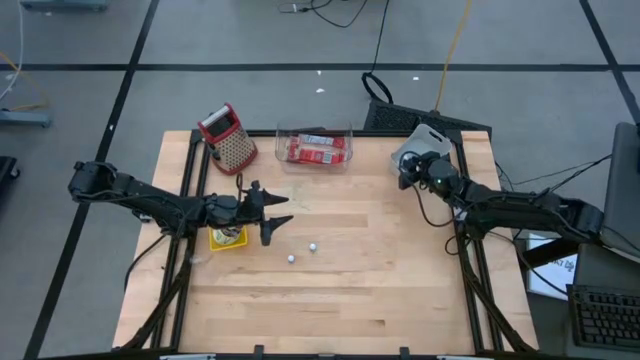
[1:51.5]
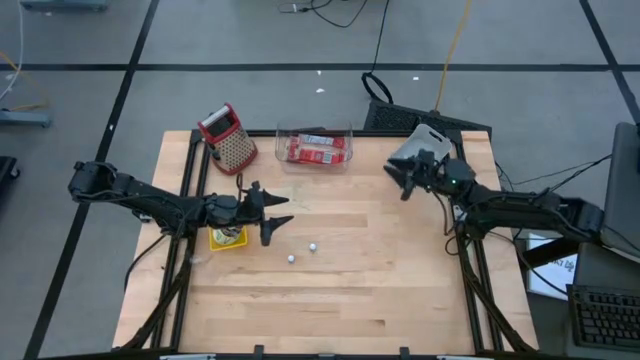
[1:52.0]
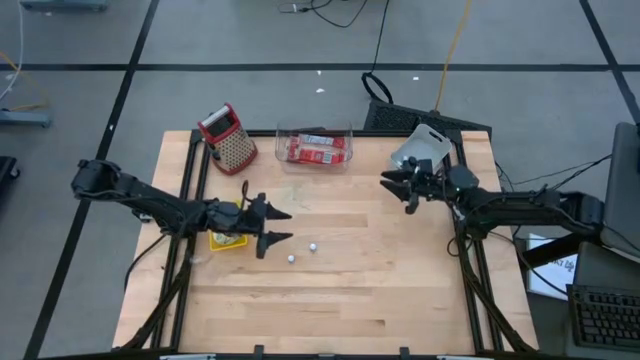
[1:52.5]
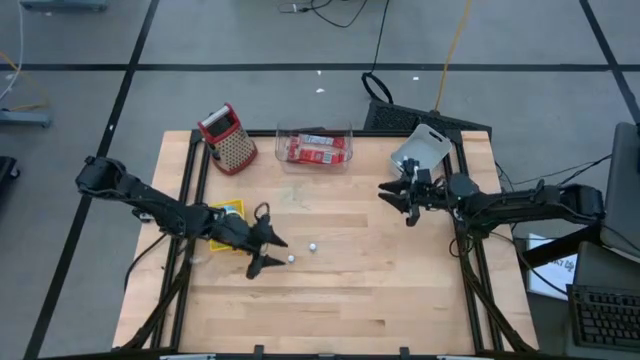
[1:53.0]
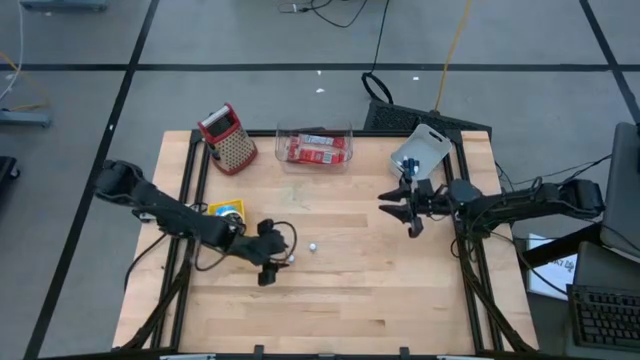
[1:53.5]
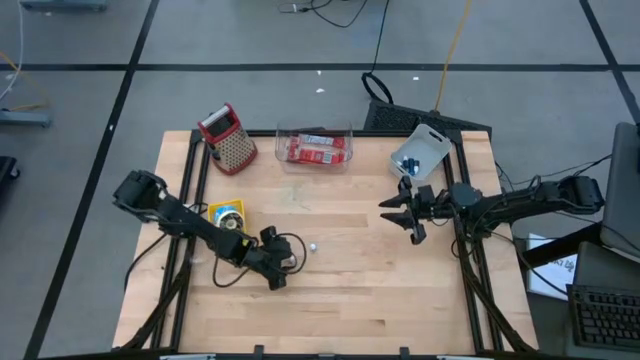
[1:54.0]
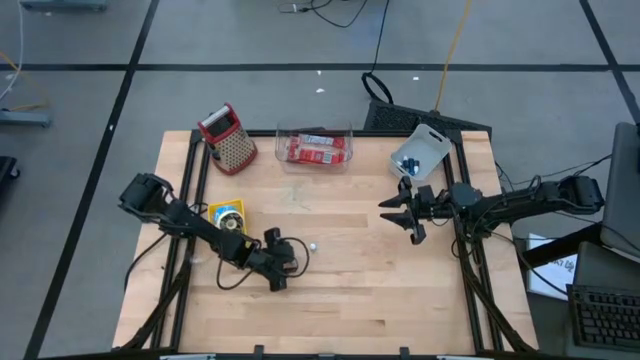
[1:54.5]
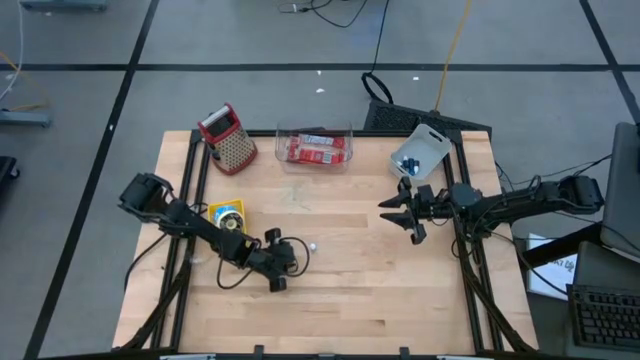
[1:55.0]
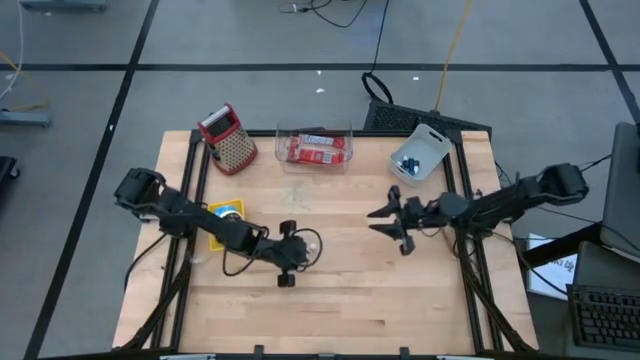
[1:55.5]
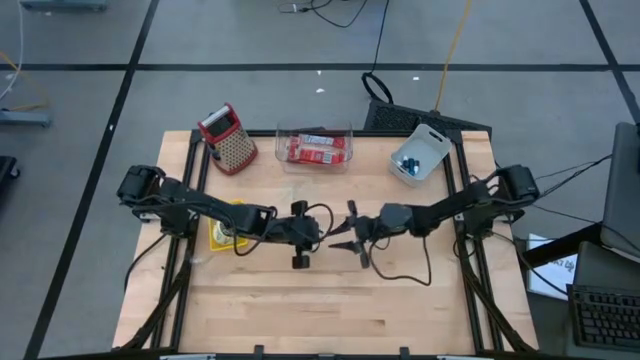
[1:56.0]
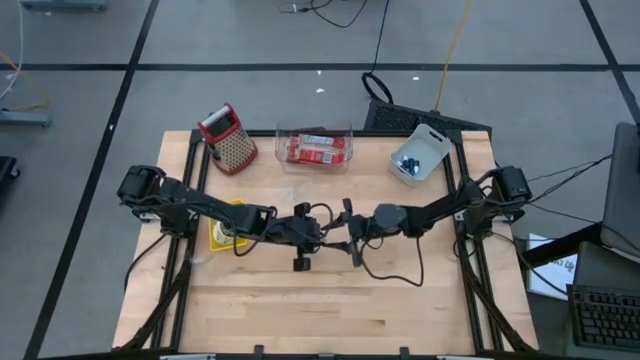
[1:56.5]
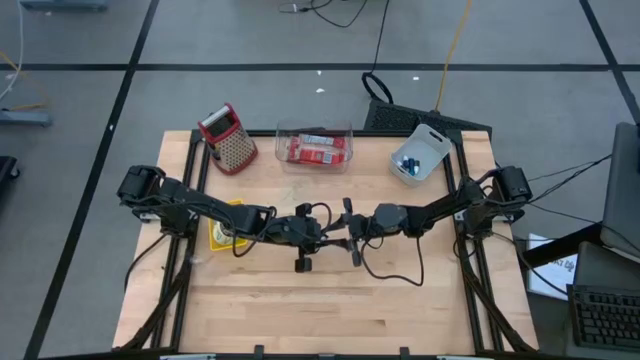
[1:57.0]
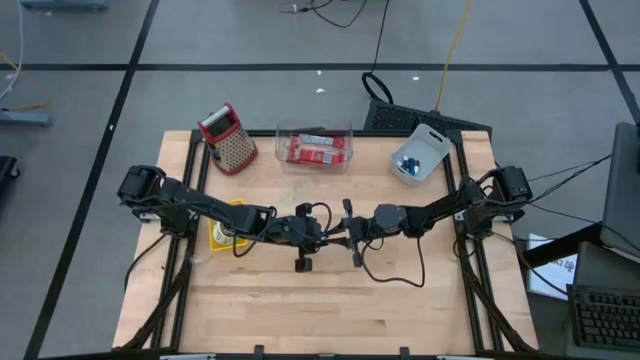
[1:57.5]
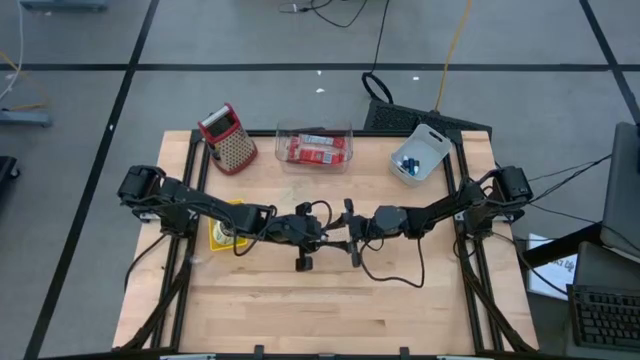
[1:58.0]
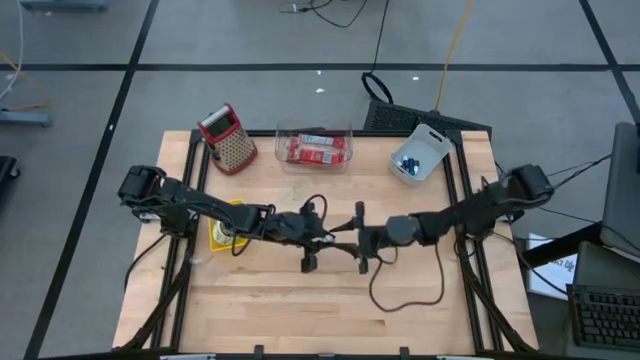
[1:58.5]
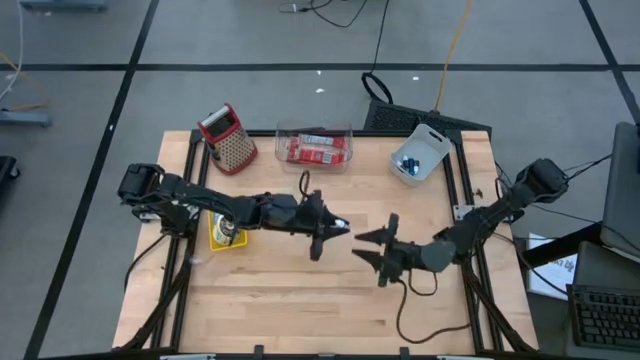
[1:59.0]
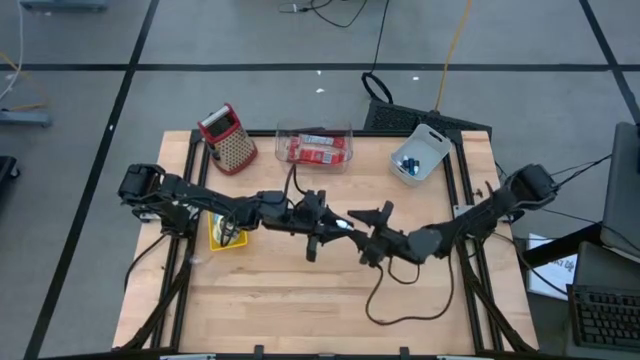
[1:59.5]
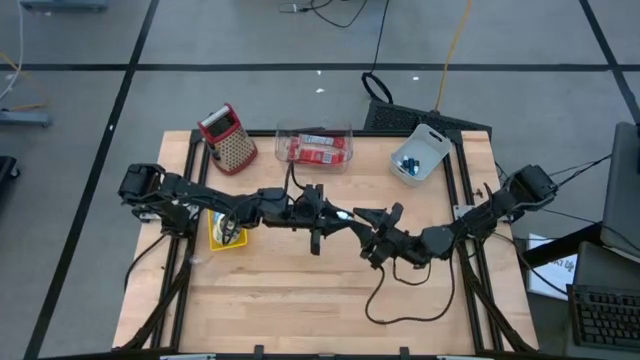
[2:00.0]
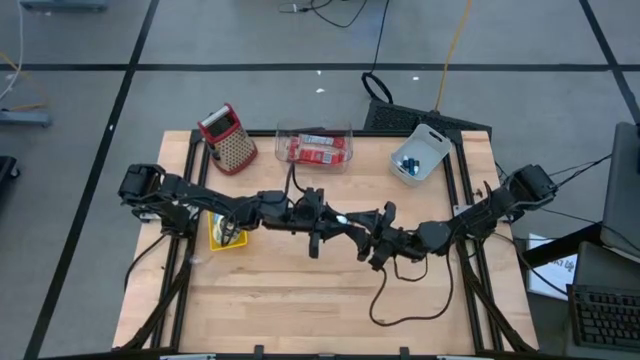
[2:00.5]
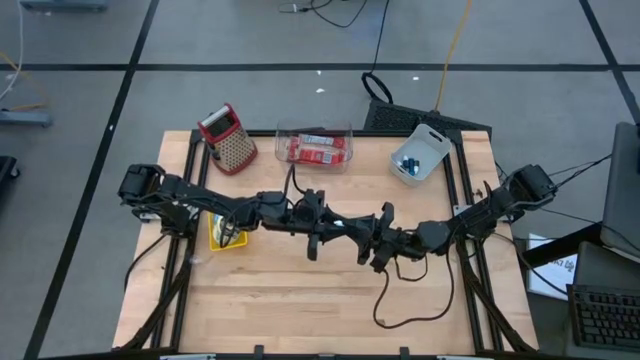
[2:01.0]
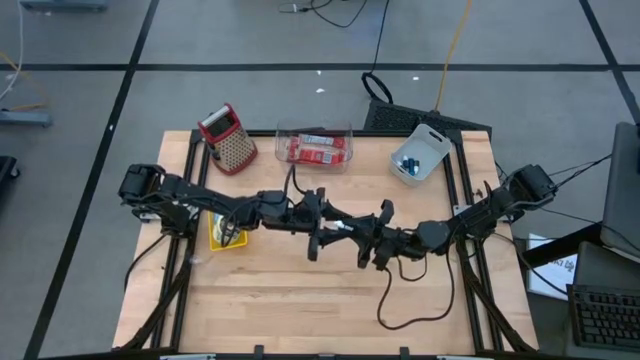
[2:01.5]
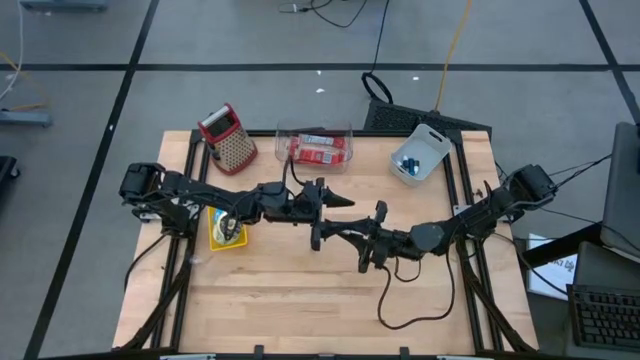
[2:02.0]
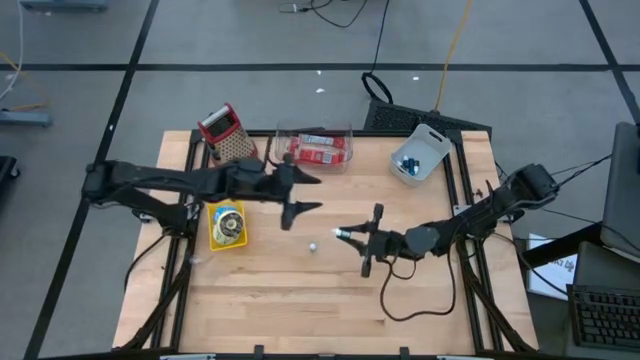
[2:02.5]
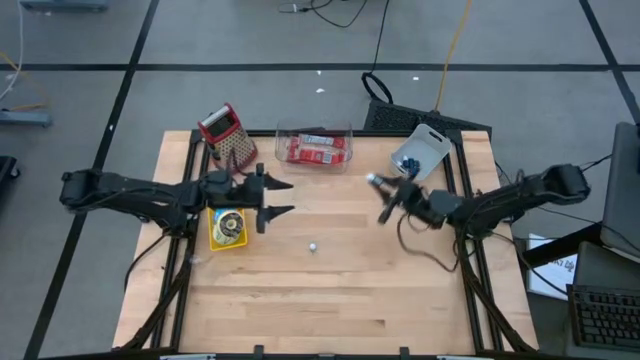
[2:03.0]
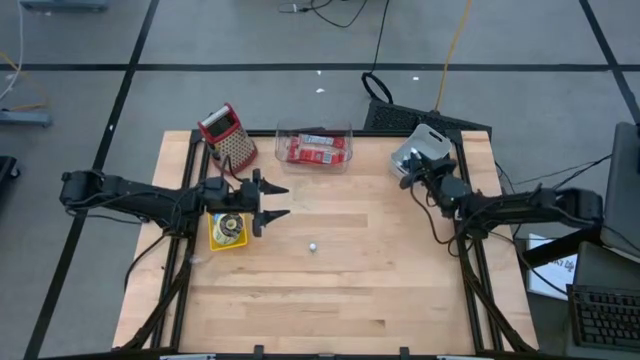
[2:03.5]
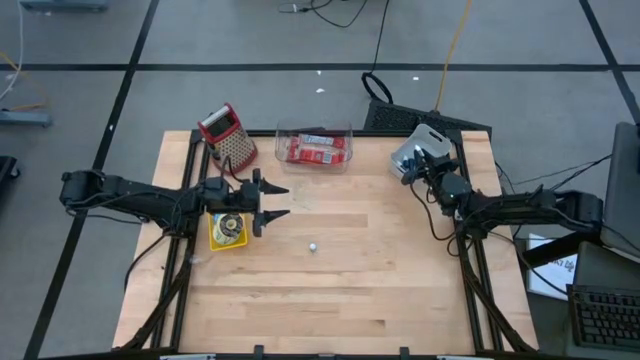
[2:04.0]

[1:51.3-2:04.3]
Put the green food coloring bottle into the white bin

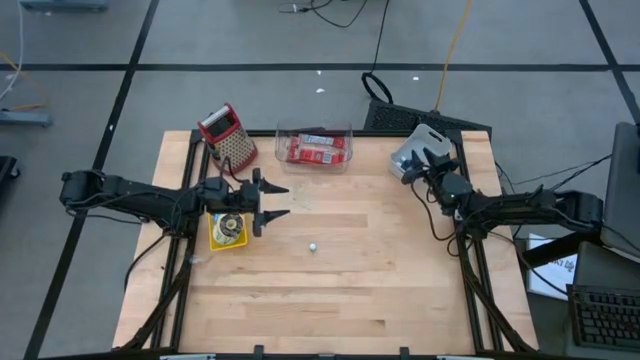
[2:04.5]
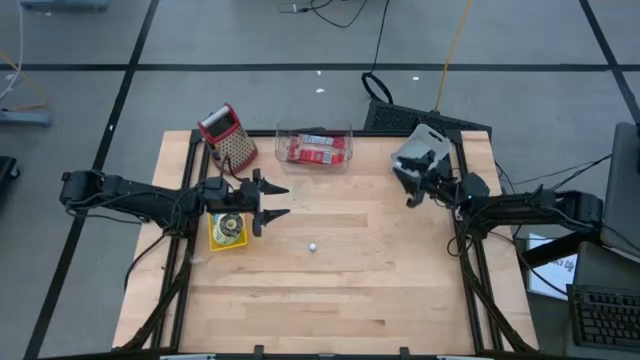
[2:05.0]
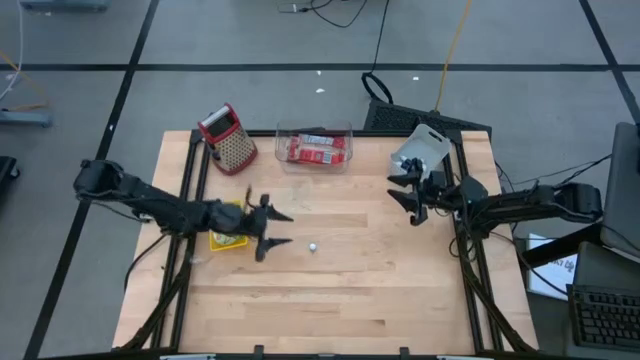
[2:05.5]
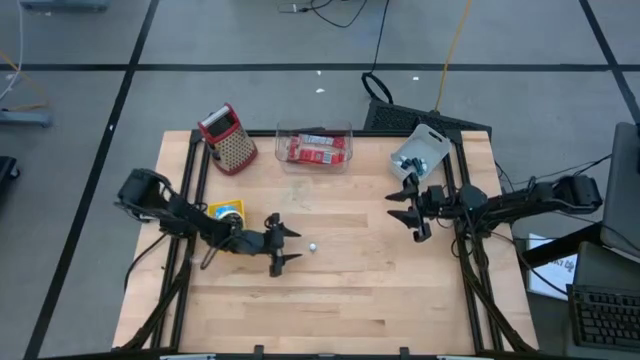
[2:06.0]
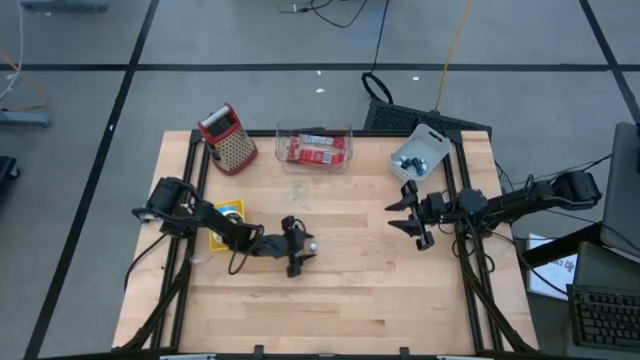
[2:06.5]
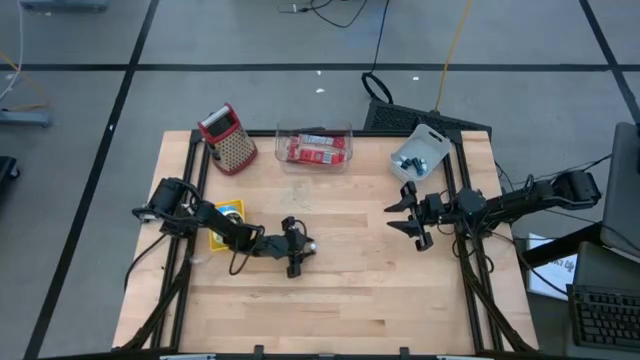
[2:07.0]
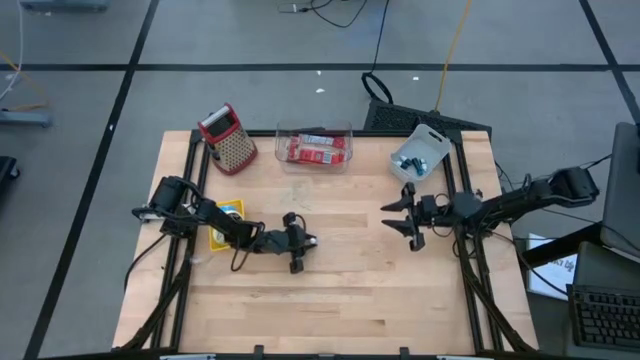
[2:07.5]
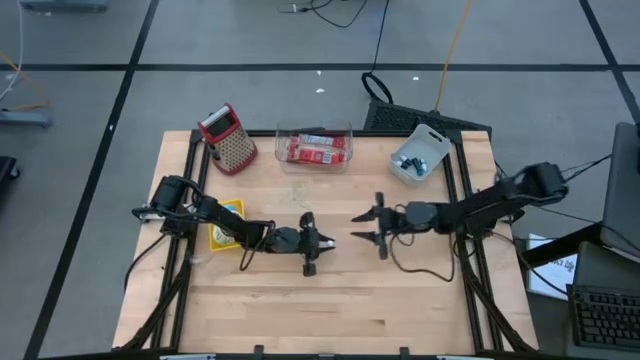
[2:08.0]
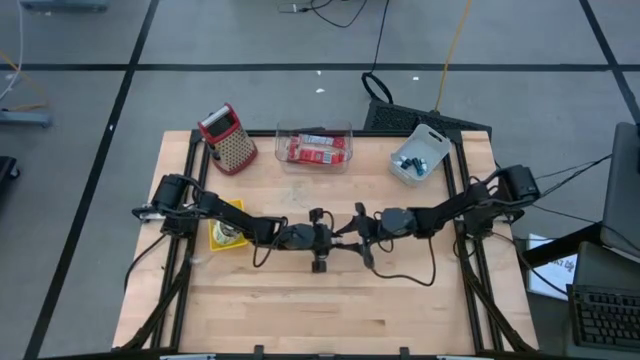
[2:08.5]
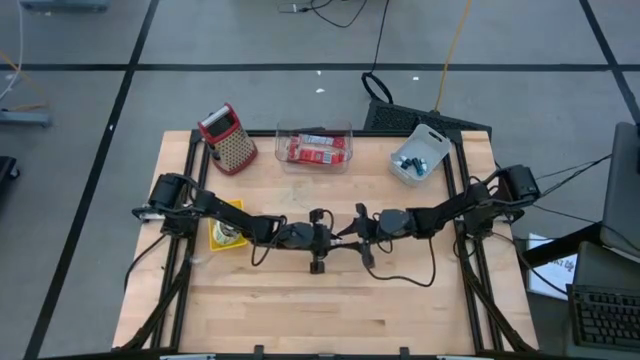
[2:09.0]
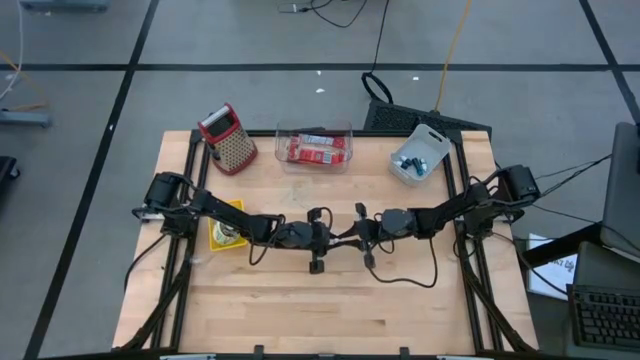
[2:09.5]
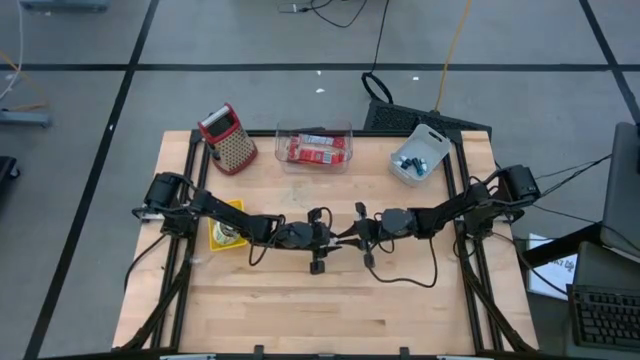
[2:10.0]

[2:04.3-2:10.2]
Put the black food coloring bottle into the white bin

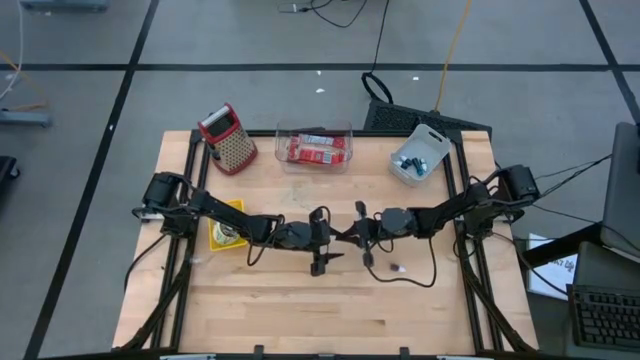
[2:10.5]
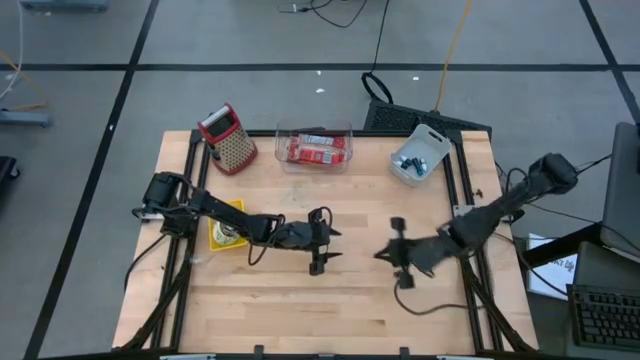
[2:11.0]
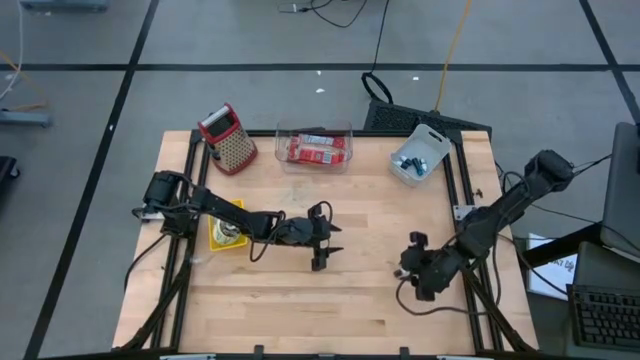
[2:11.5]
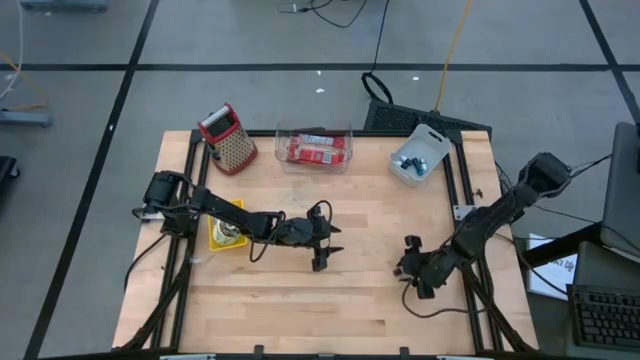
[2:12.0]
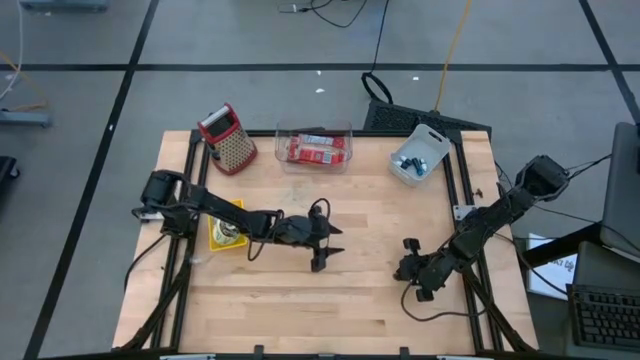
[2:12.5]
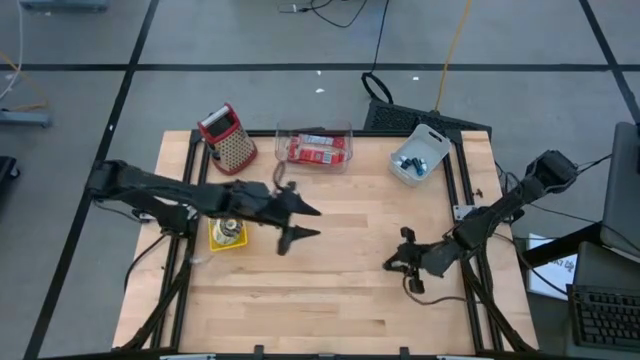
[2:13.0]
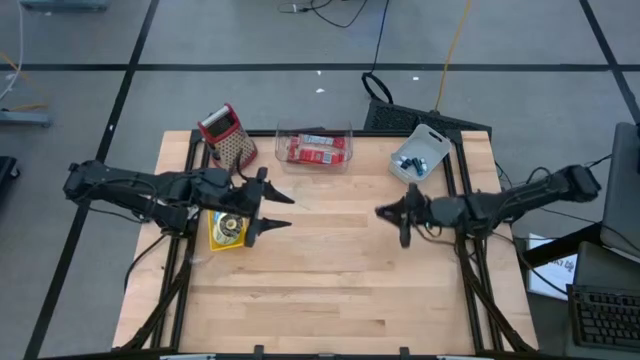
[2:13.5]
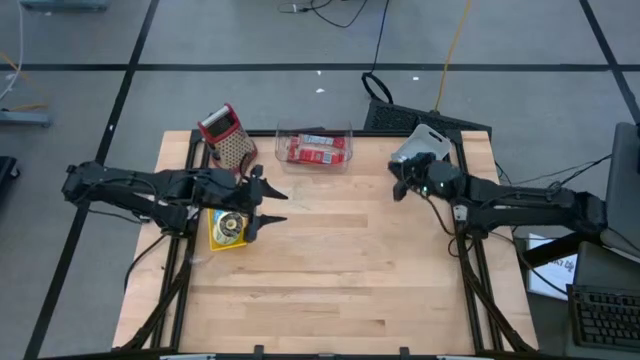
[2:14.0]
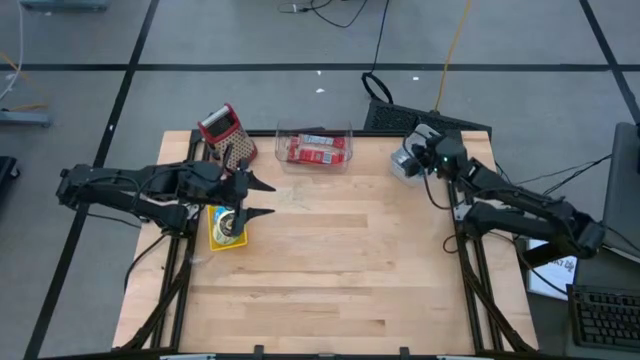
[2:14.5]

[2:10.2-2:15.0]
Put the black food coloring bottle into the white bin
